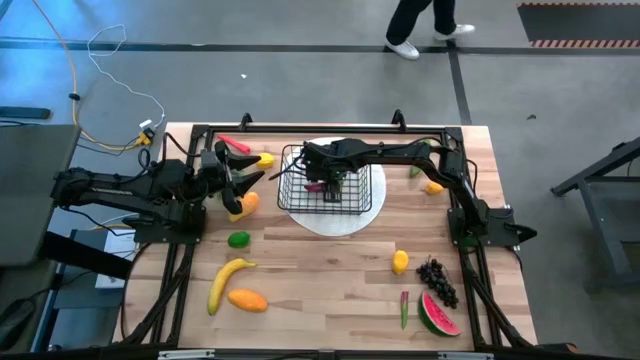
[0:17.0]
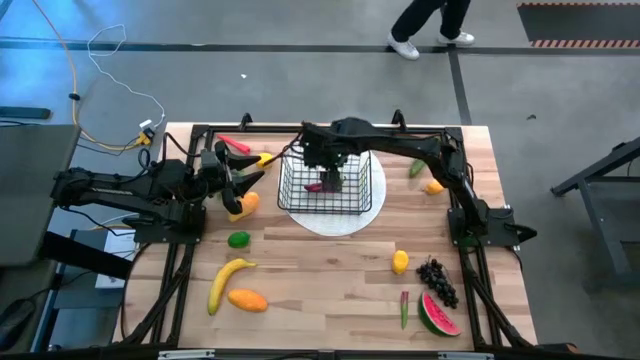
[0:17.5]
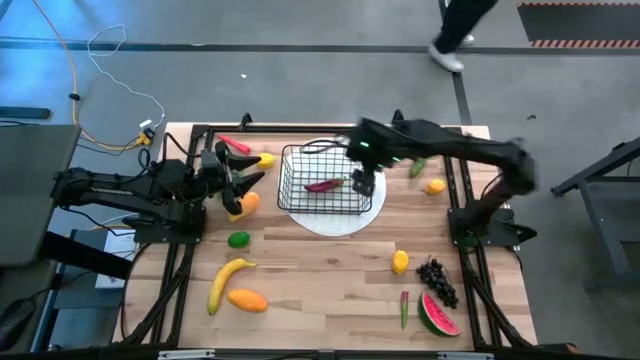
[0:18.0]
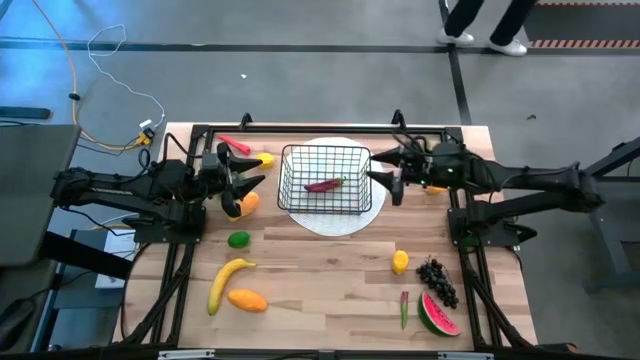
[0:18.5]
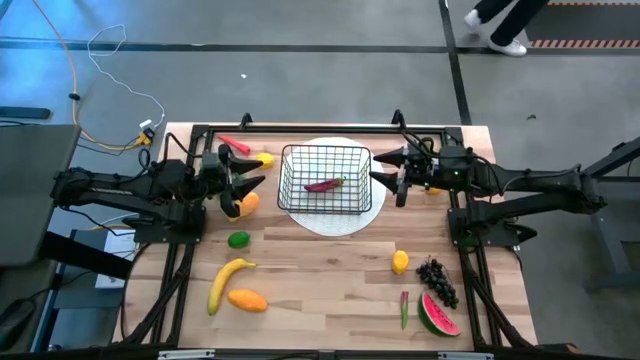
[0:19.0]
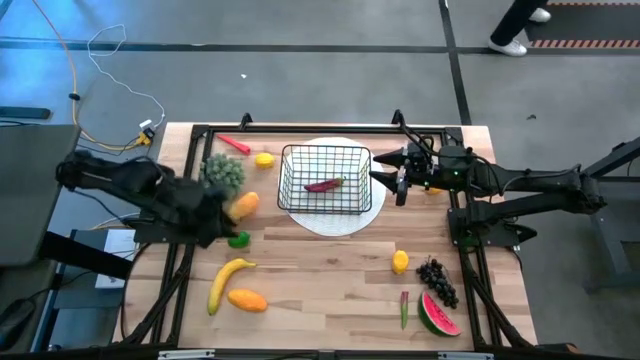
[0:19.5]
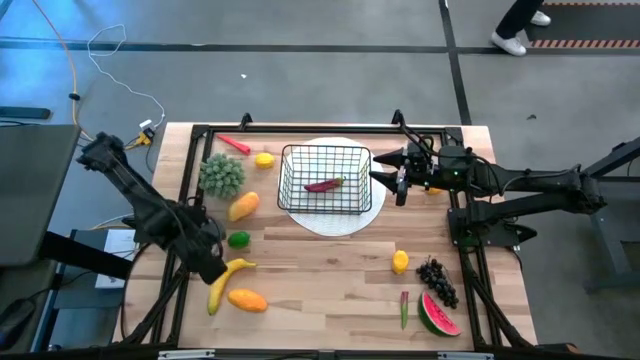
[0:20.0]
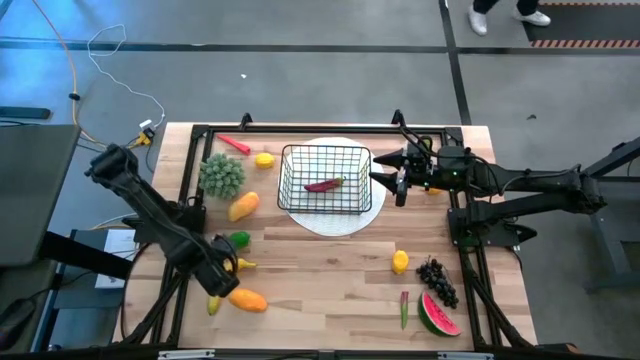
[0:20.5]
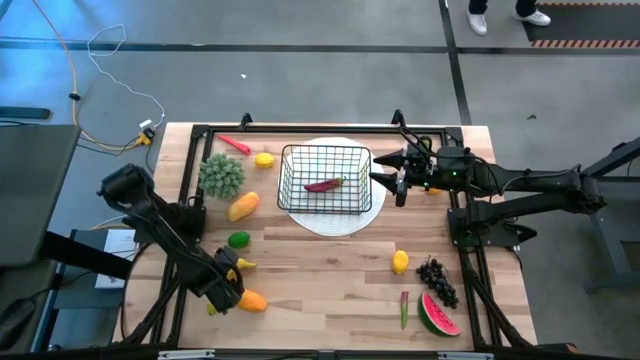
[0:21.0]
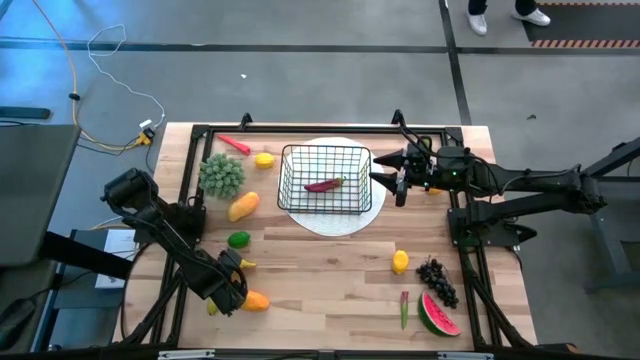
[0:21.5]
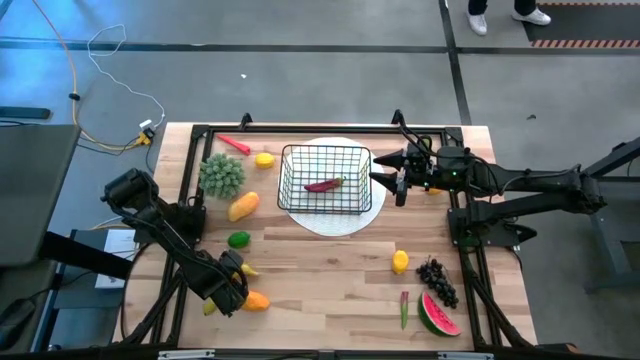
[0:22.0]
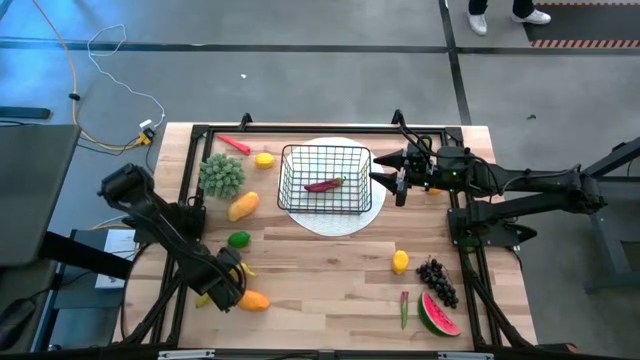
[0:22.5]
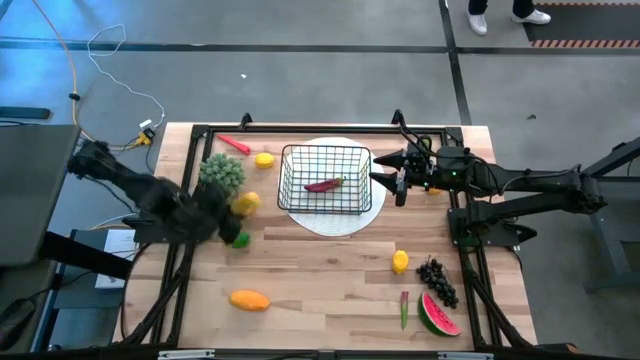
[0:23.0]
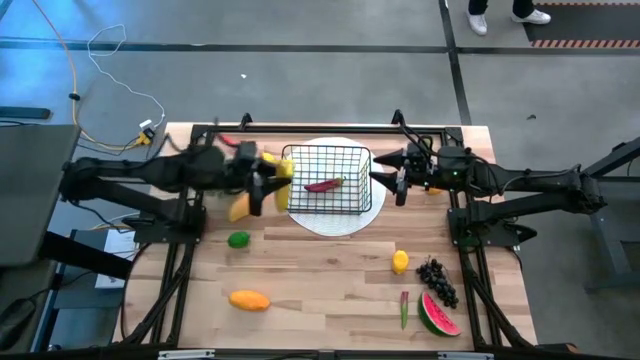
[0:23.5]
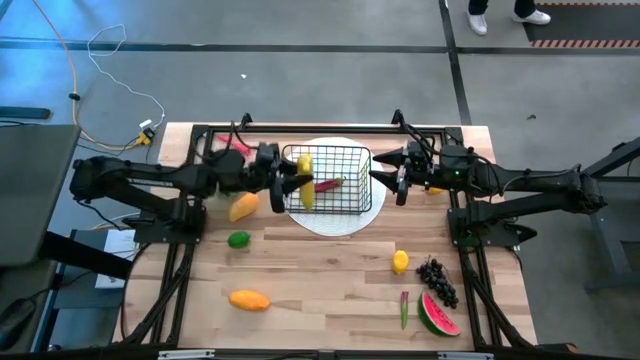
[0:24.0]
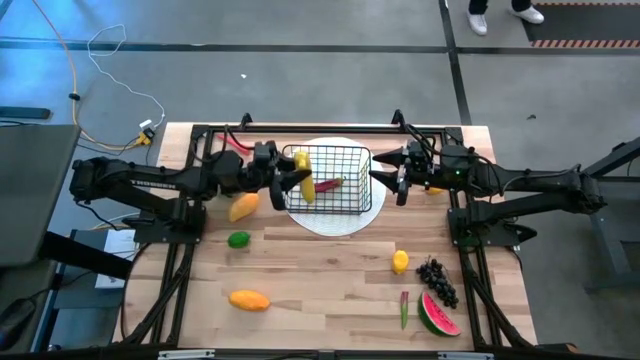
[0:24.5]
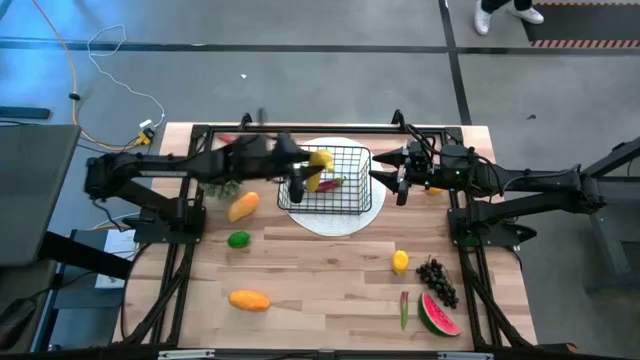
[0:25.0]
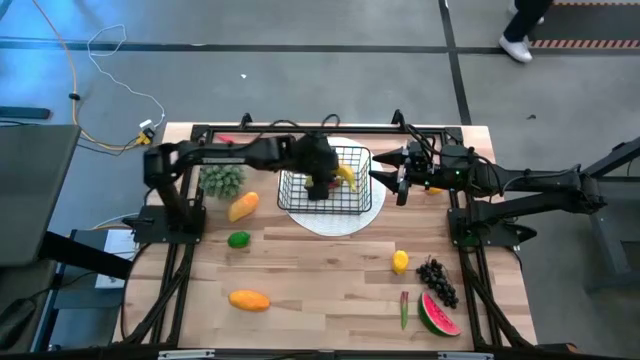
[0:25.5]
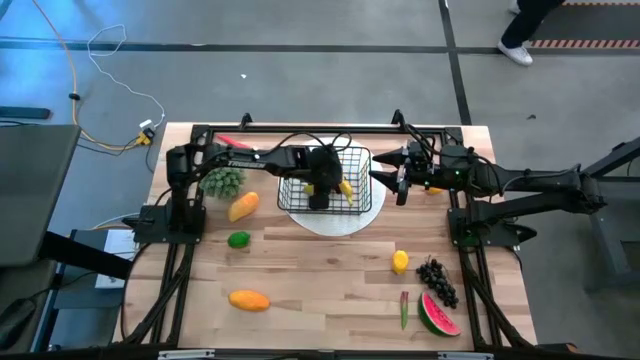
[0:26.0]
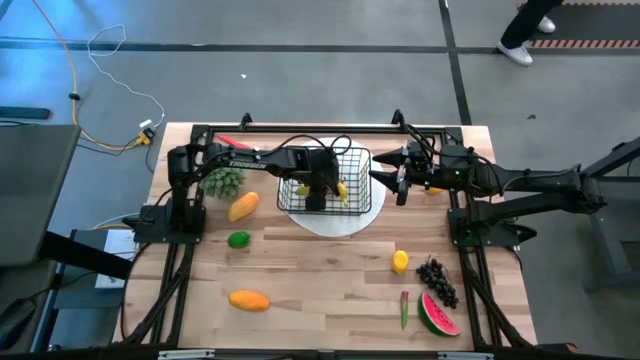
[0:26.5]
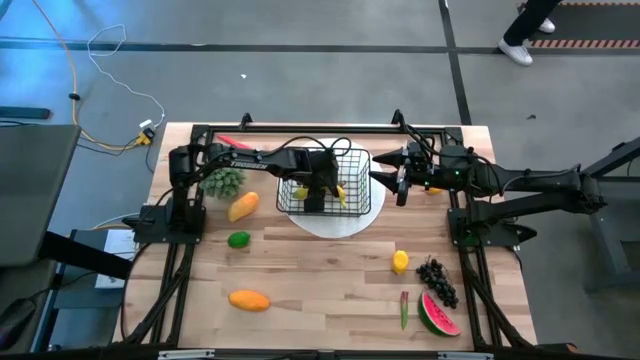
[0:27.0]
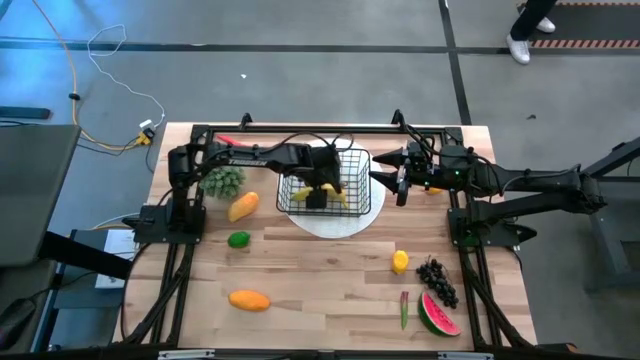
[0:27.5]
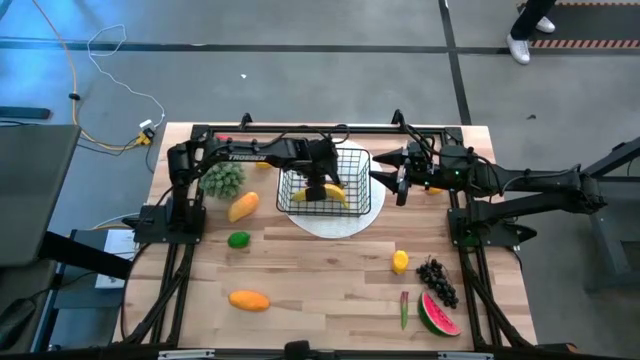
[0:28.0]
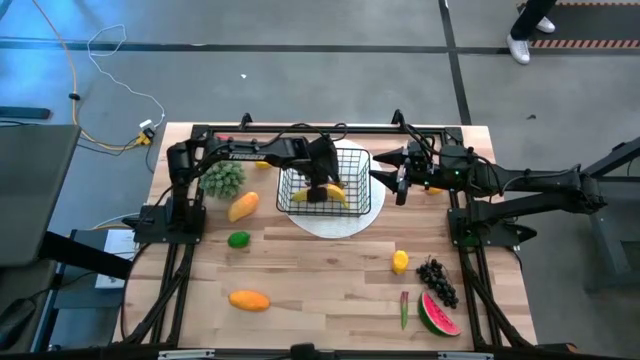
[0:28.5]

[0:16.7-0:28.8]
Task: Build produce basket
Put the yellow banana into the wire basket

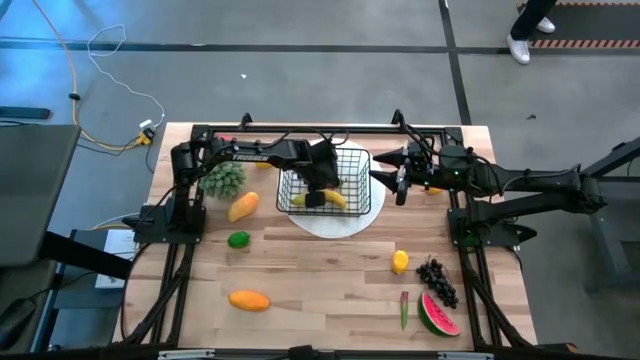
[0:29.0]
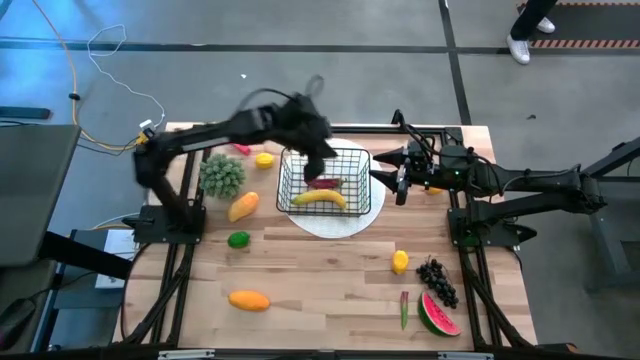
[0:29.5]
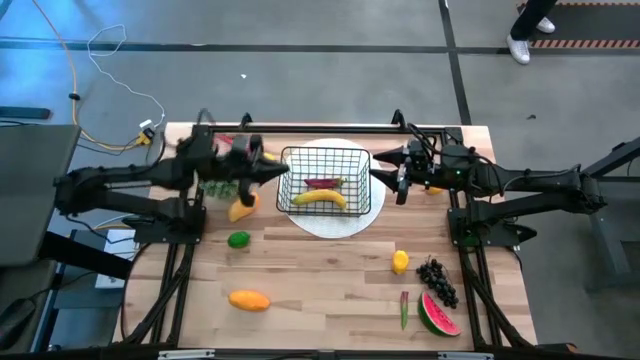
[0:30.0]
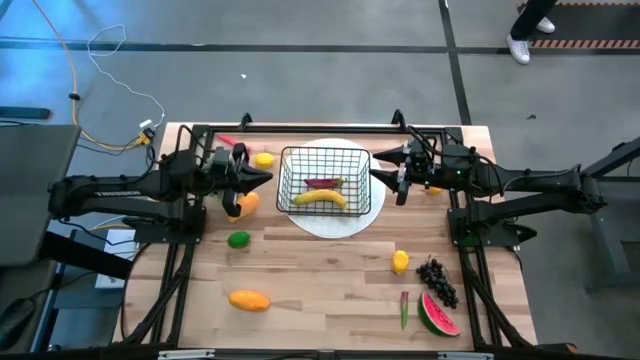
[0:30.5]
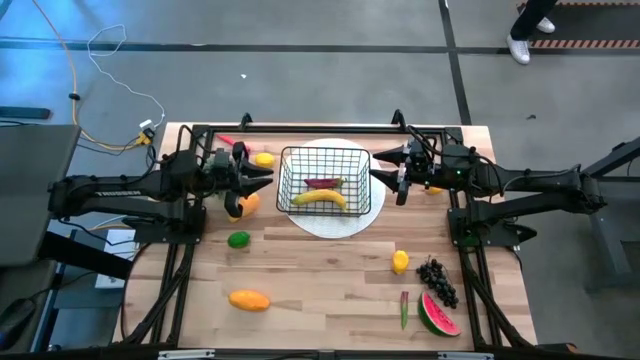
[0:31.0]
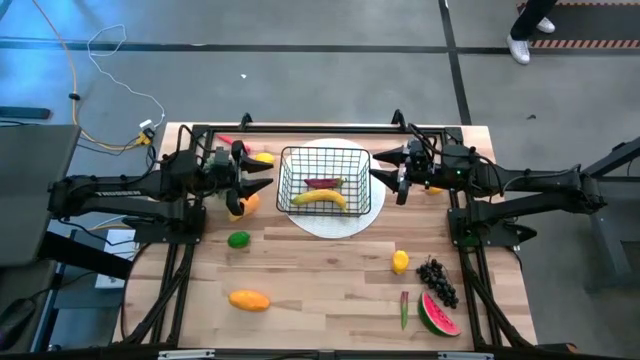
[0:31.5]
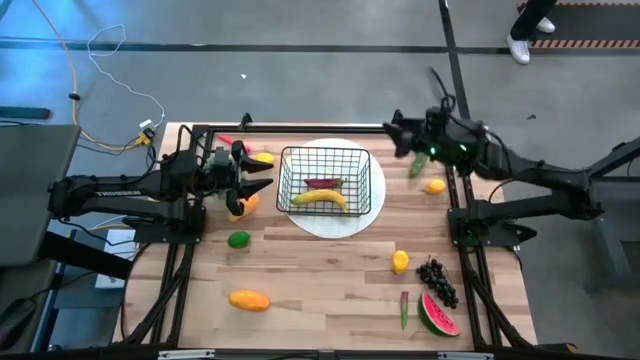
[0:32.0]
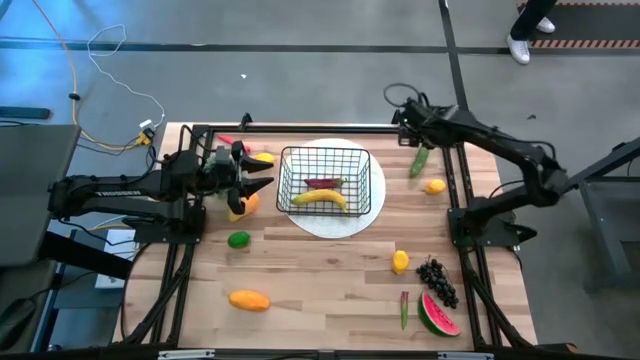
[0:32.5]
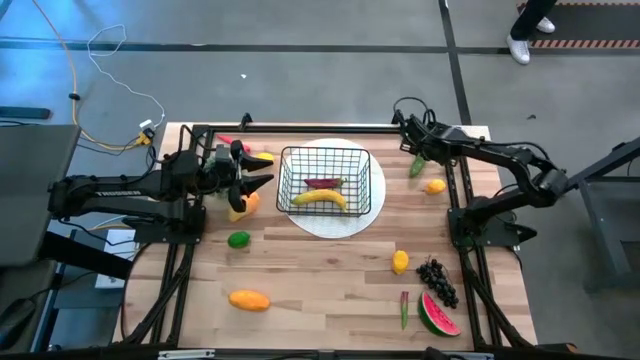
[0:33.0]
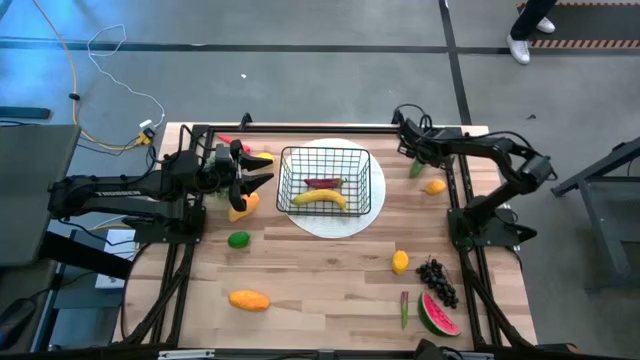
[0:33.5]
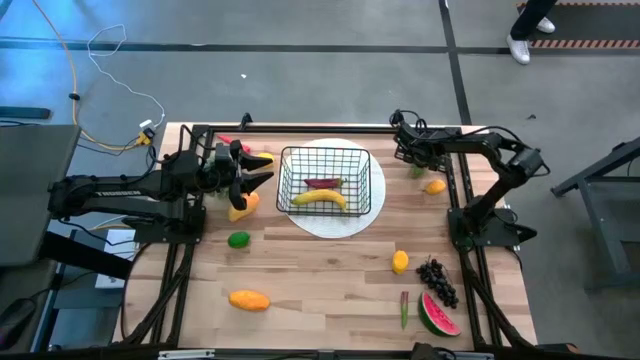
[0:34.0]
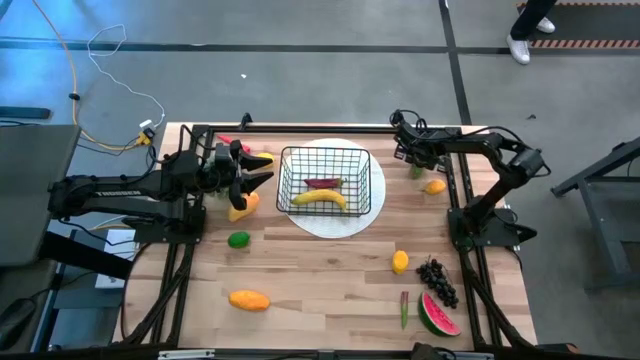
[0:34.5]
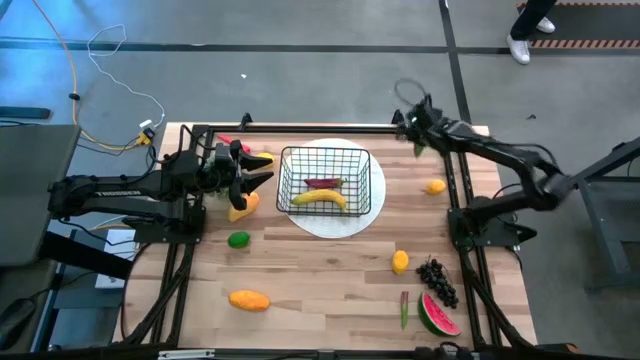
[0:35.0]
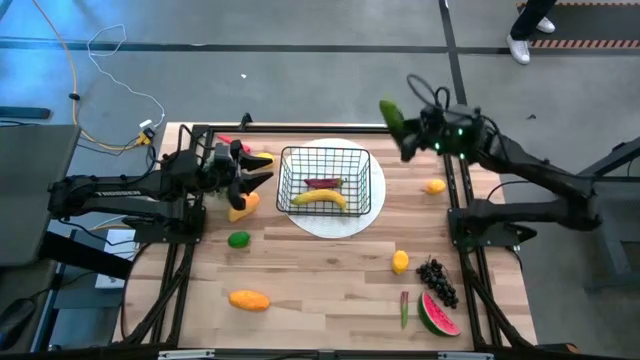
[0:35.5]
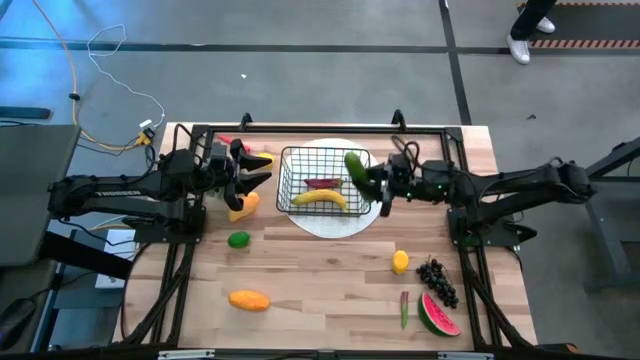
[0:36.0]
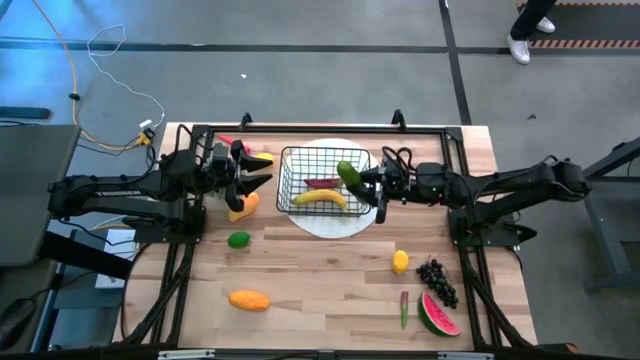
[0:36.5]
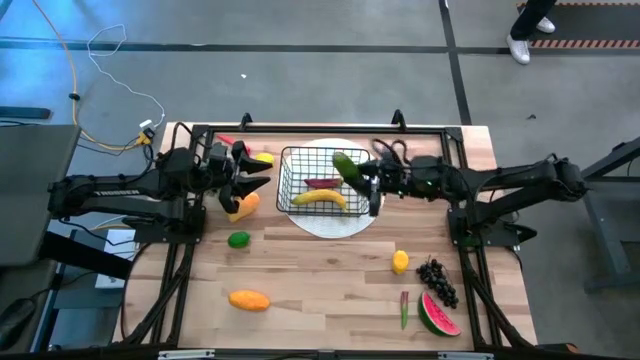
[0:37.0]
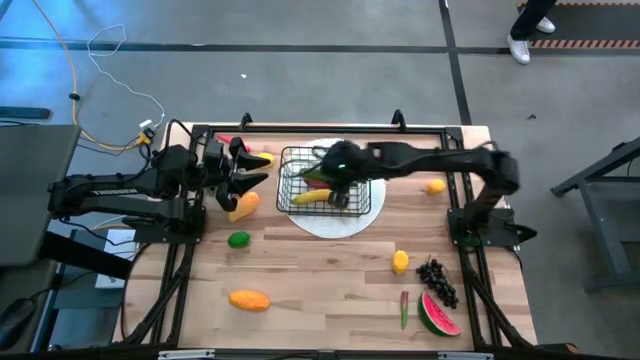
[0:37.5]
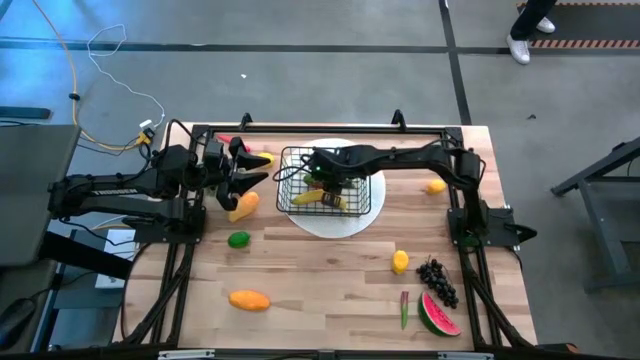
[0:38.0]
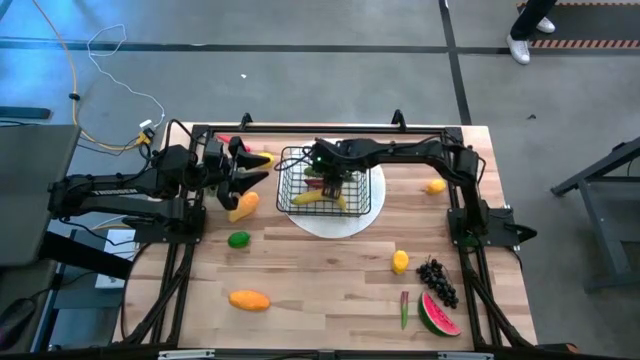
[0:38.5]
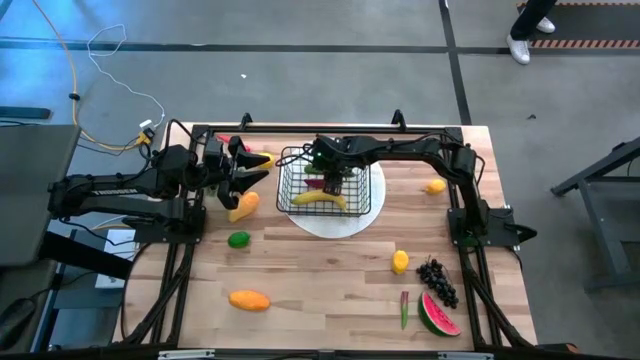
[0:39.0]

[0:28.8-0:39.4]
Put the green cucumber into the wire basket
